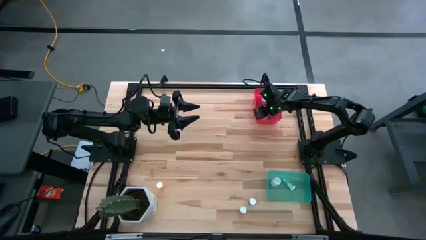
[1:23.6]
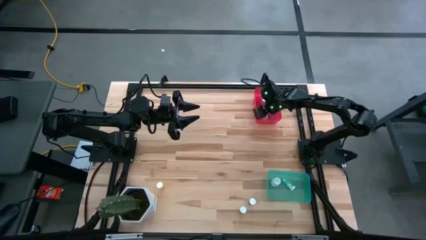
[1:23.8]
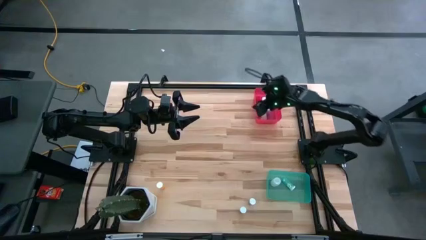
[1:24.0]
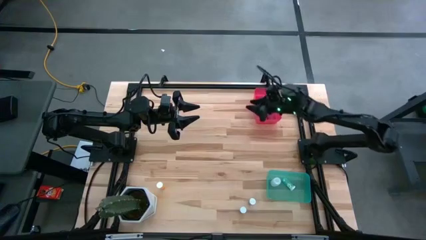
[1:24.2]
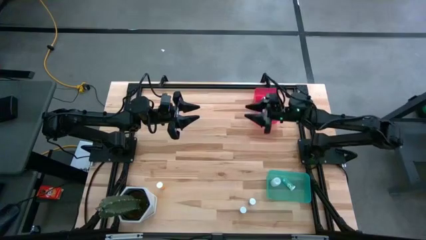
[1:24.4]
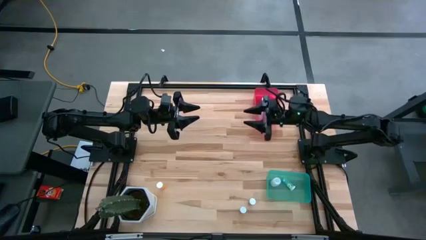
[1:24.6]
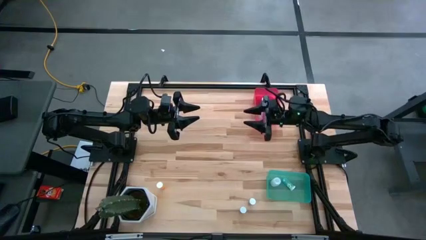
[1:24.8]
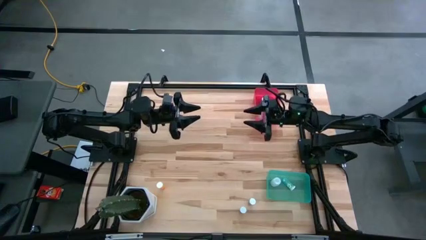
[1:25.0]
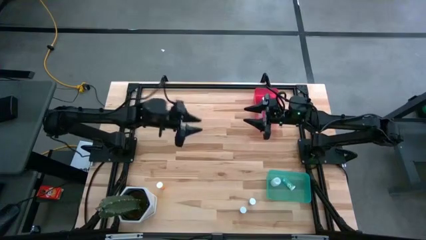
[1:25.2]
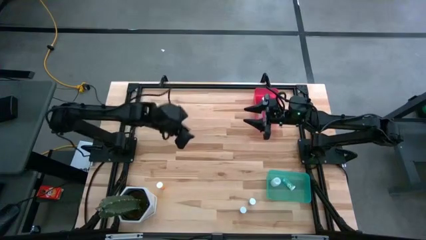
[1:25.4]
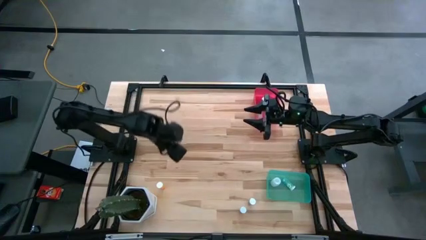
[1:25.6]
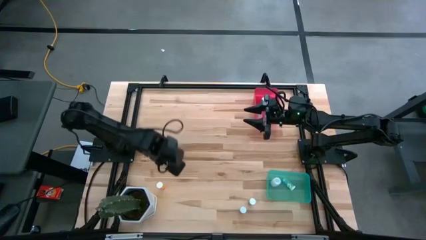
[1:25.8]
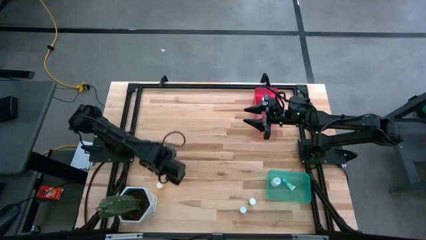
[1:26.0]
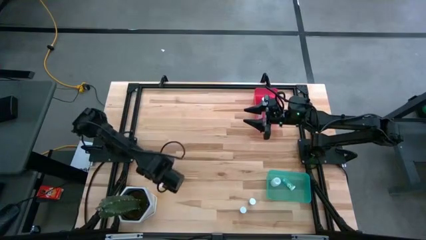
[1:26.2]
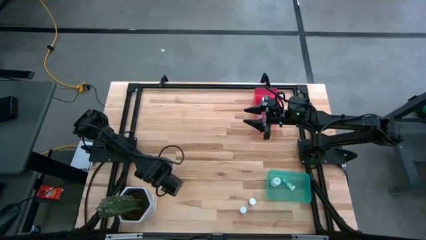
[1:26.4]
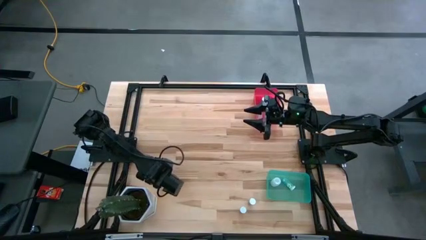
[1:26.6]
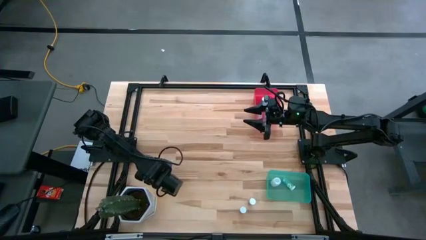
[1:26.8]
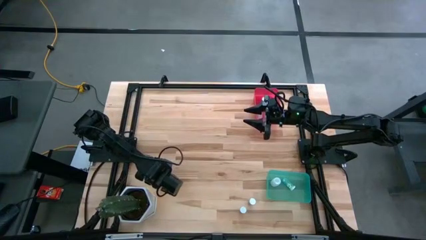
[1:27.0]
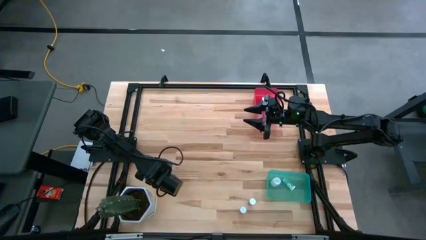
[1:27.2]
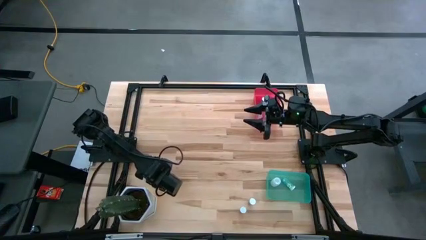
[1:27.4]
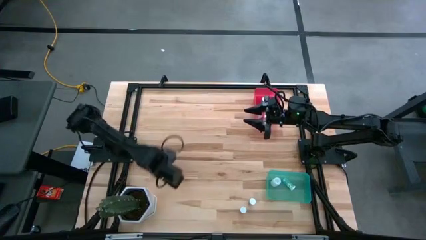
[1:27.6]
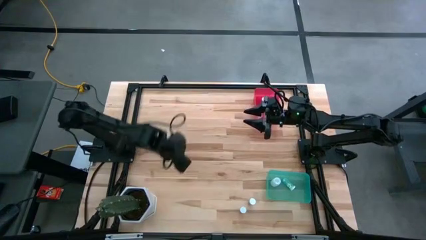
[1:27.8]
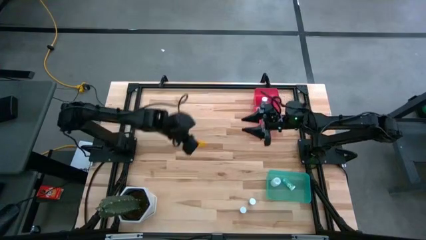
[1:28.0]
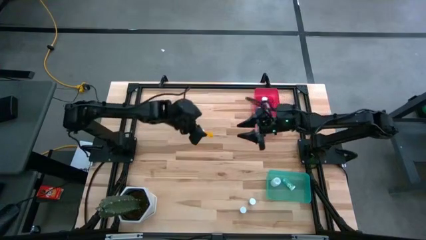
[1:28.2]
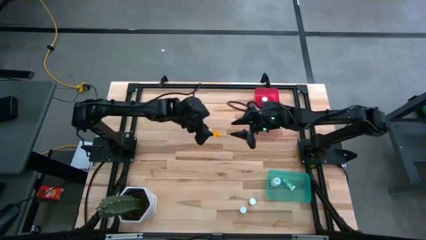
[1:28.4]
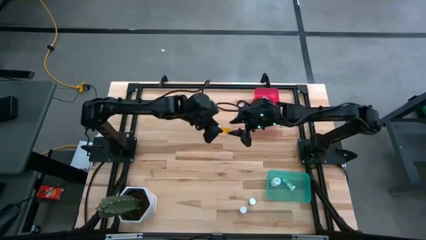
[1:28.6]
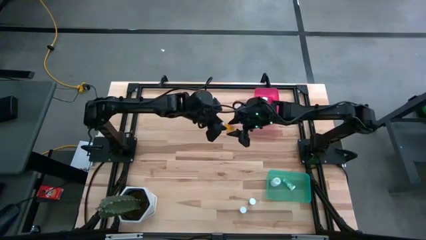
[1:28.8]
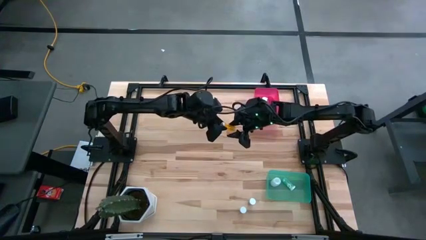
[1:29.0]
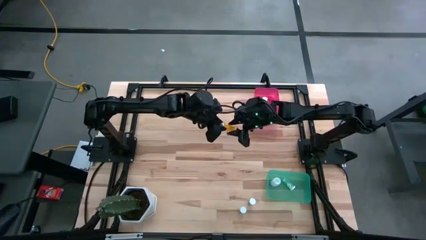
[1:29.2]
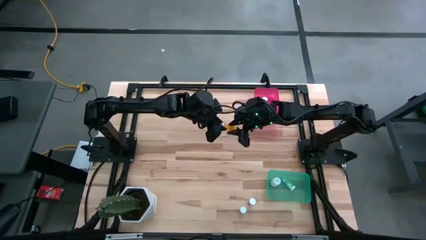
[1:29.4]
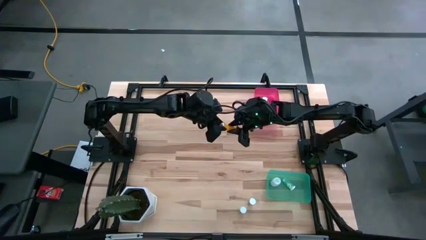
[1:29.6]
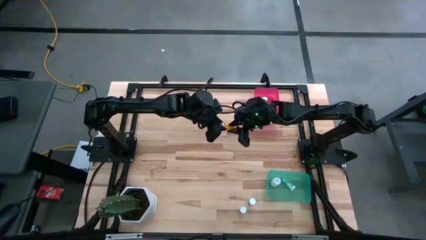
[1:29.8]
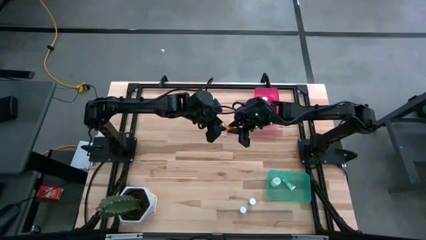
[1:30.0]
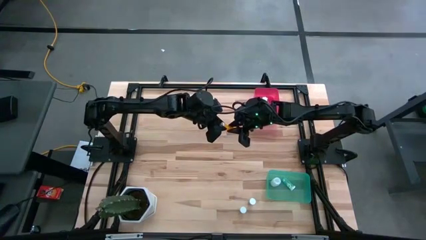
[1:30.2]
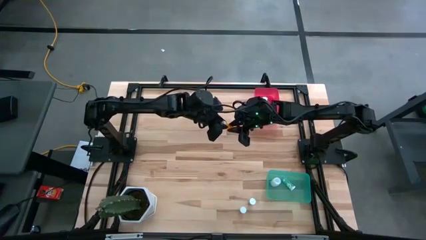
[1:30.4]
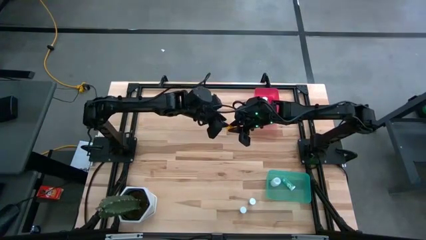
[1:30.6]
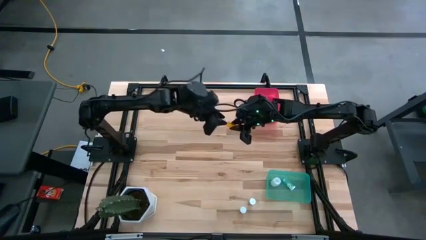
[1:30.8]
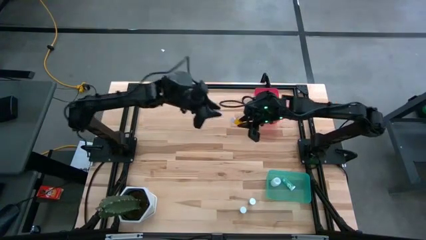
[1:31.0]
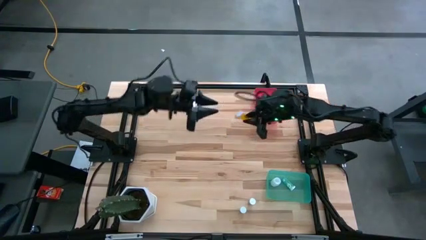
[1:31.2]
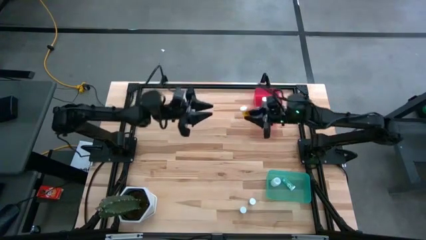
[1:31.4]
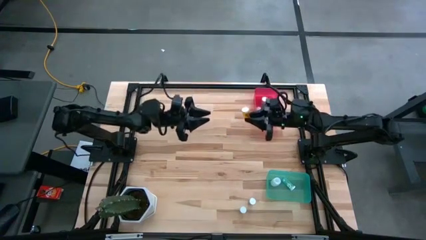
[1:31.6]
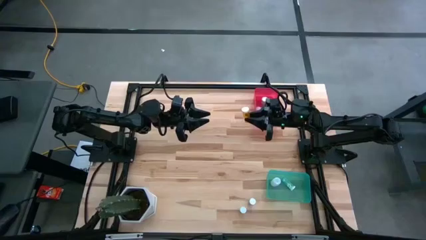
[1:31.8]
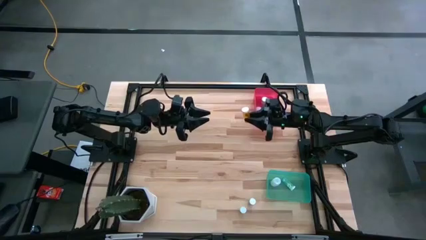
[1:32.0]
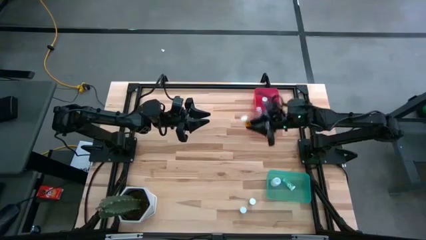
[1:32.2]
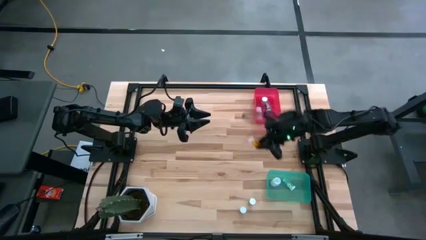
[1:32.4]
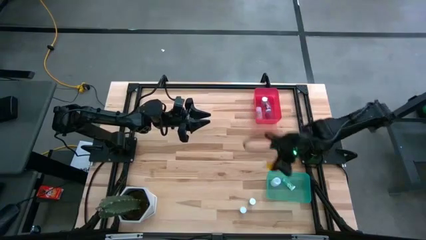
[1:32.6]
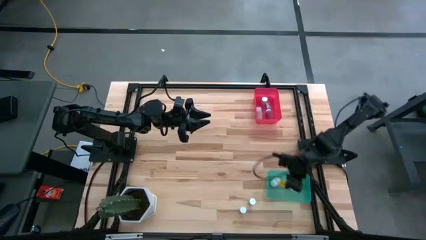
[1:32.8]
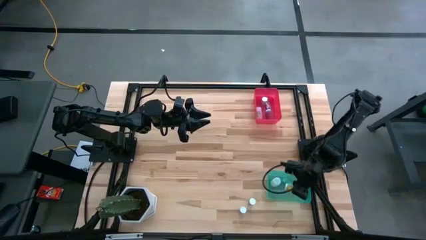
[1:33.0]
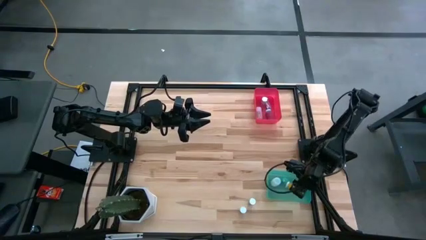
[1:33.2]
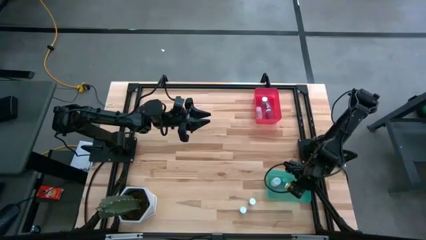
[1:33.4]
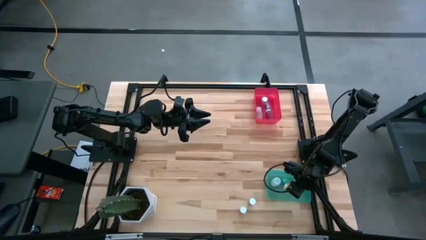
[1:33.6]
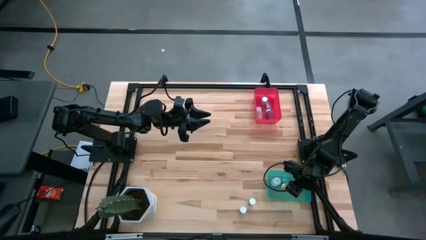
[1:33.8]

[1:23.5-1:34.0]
Task: Pick and place medicine bottles into bin by pill shape (circle, oval)
Put the orange tablet bottle into the green bin

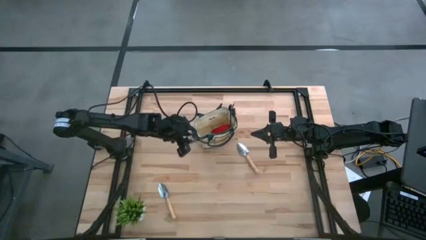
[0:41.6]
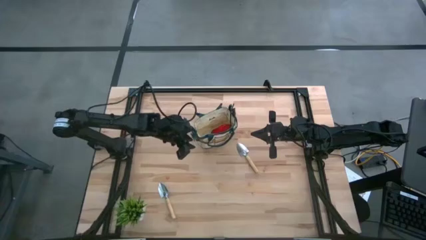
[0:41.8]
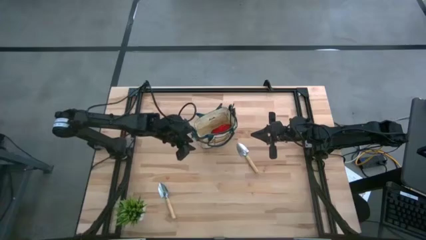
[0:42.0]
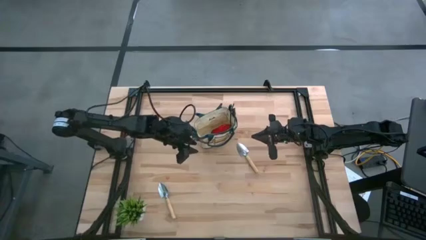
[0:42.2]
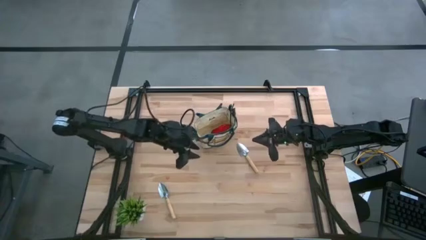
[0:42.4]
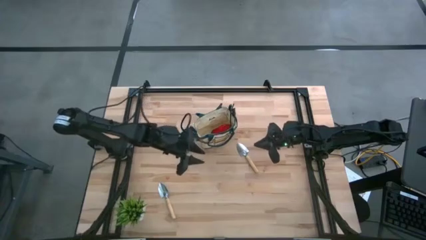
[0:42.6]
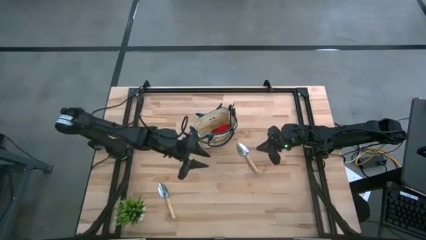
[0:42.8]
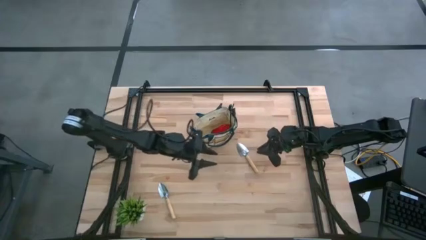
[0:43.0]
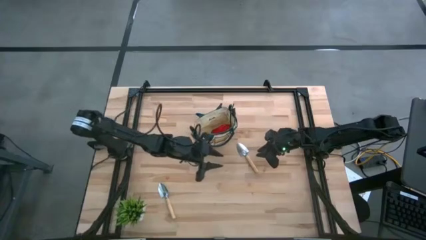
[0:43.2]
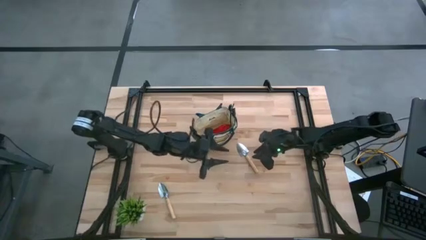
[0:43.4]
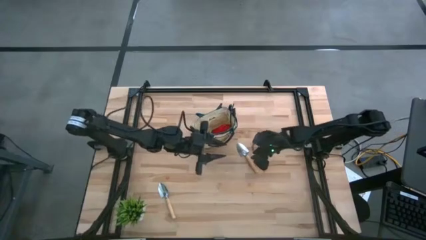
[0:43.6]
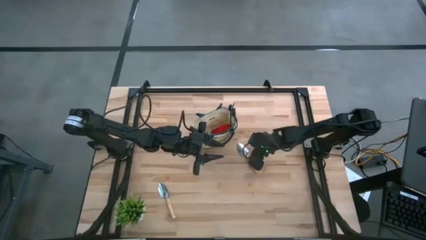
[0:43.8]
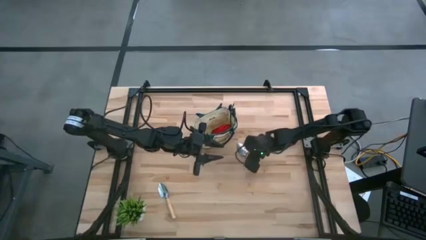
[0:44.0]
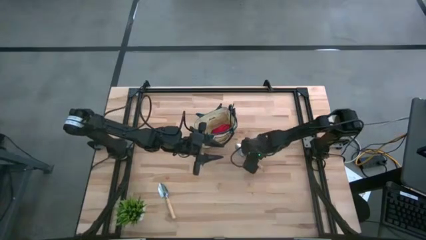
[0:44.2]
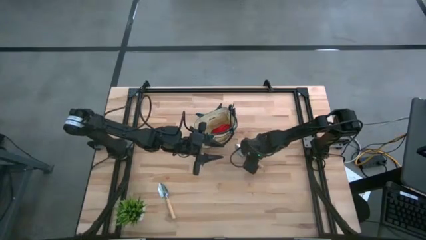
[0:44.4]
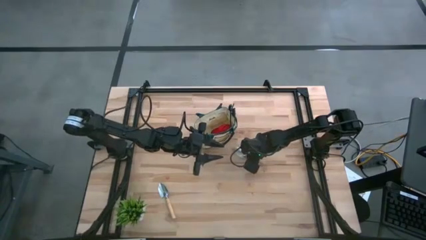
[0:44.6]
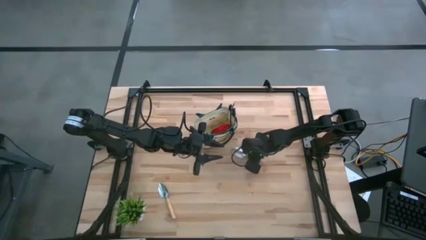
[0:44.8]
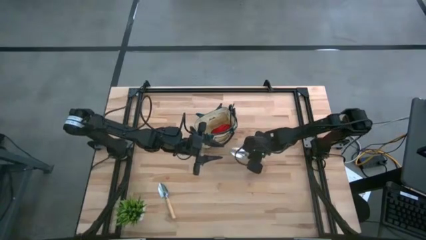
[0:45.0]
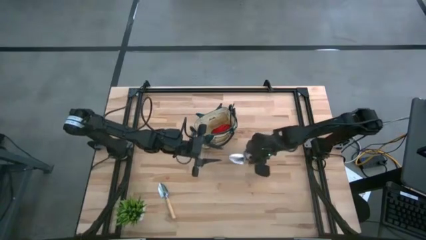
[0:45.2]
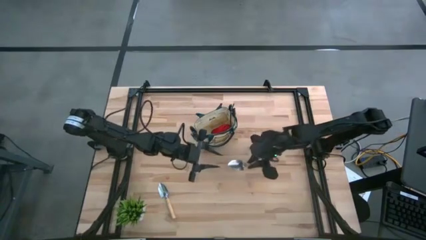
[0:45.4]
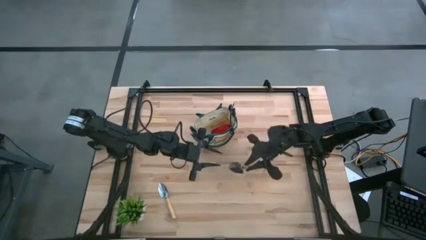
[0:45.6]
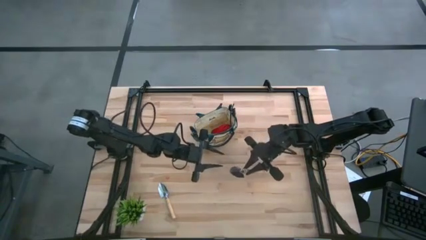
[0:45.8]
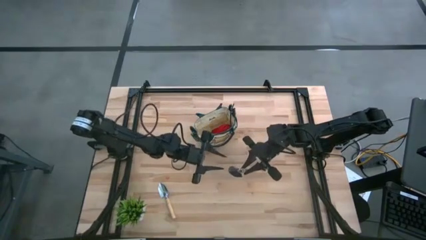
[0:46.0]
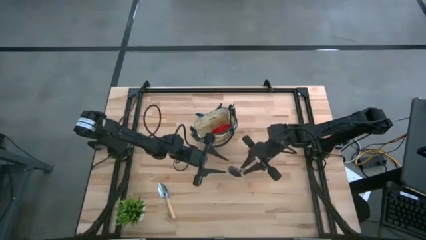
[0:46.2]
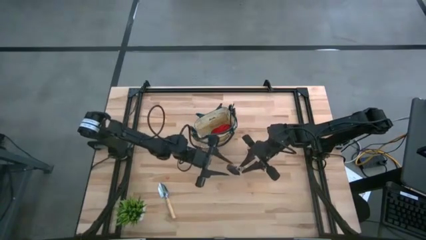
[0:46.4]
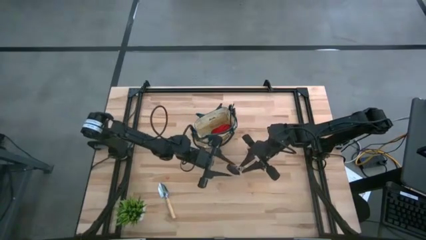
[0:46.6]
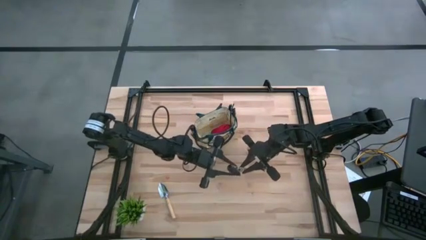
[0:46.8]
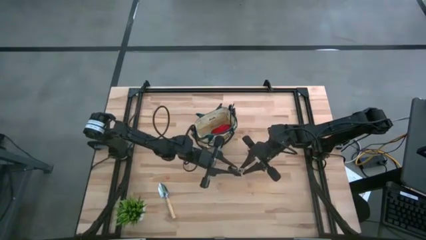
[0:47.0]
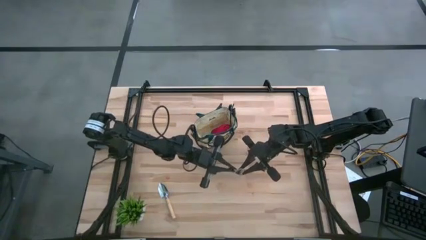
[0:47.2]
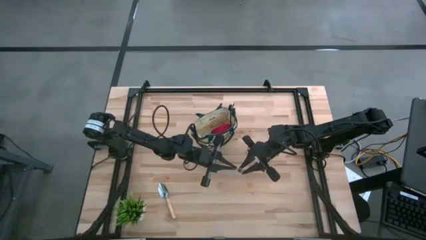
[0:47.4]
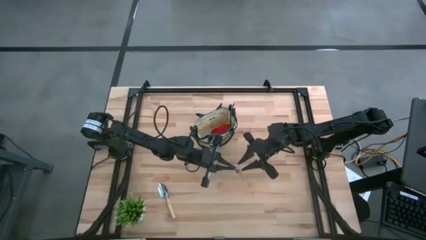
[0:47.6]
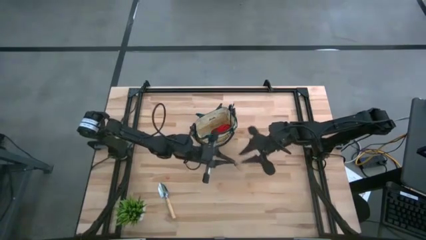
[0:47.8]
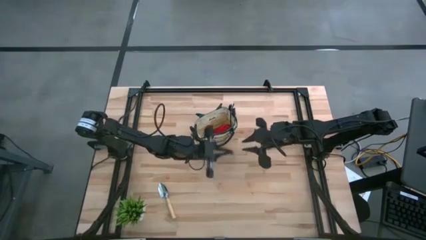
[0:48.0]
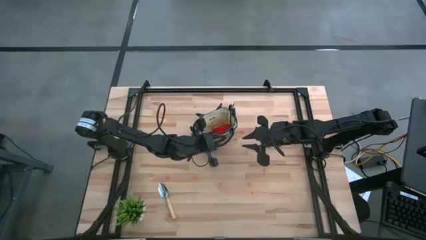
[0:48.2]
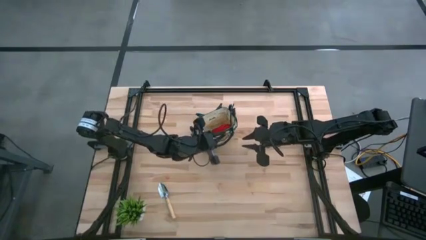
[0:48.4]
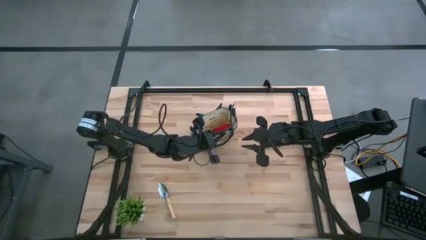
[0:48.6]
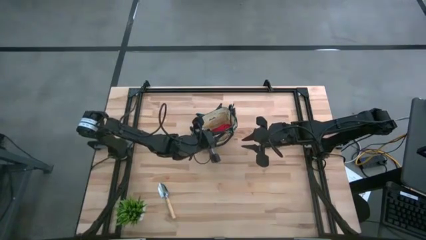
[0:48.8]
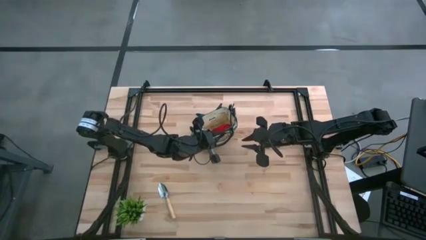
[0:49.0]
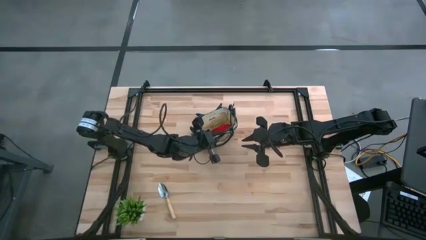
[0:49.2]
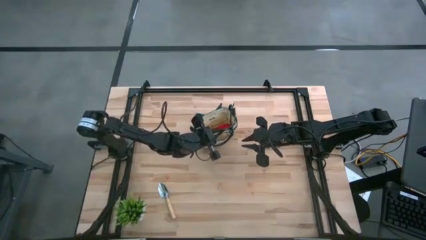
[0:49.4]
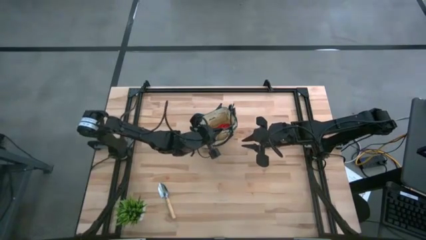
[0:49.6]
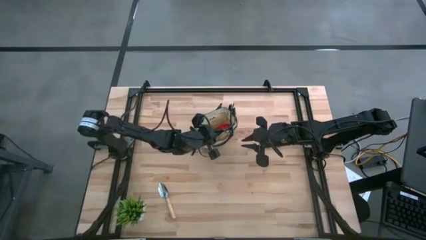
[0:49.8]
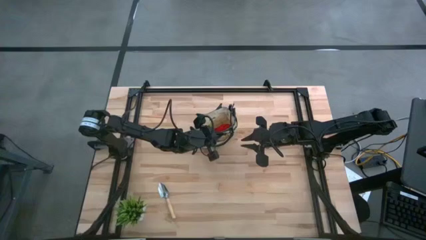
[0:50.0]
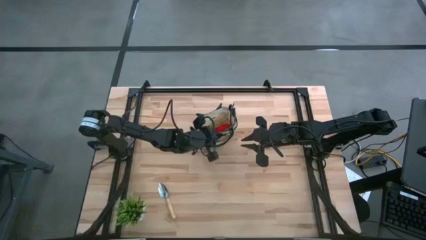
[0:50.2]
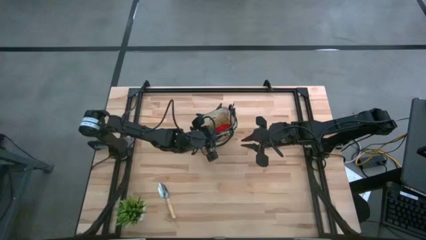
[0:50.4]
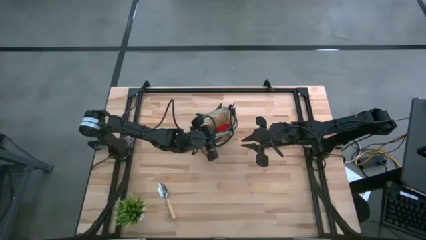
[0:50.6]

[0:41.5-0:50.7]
Task: Pick & Place Garden tools in Gardening bag
Put the top brown trowel into the brown gardening bag
